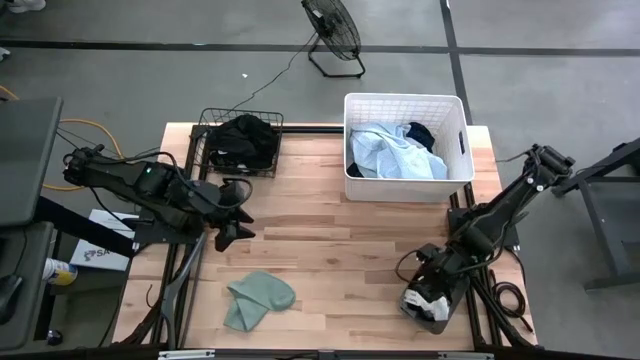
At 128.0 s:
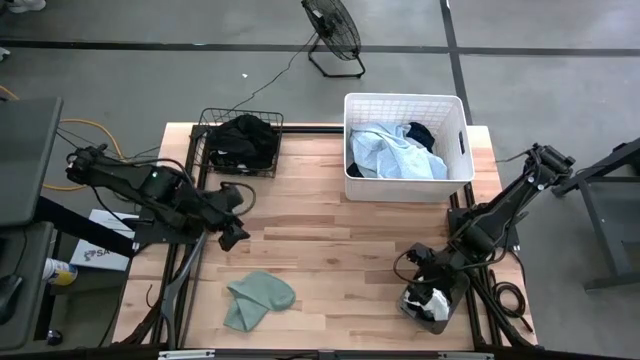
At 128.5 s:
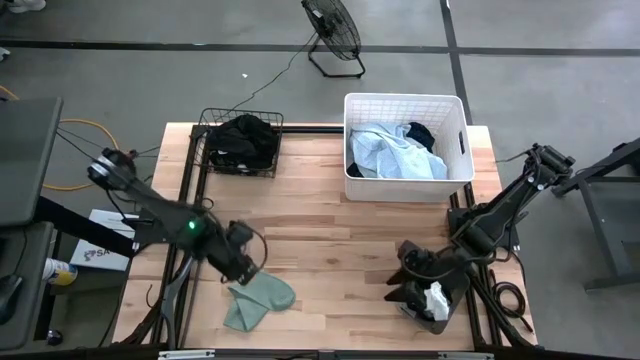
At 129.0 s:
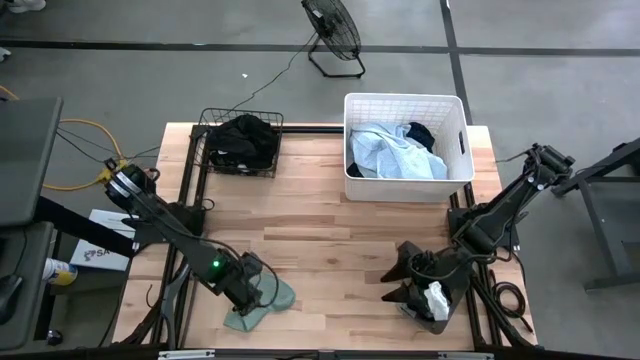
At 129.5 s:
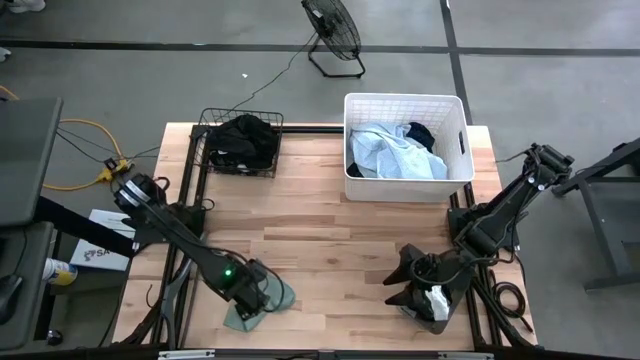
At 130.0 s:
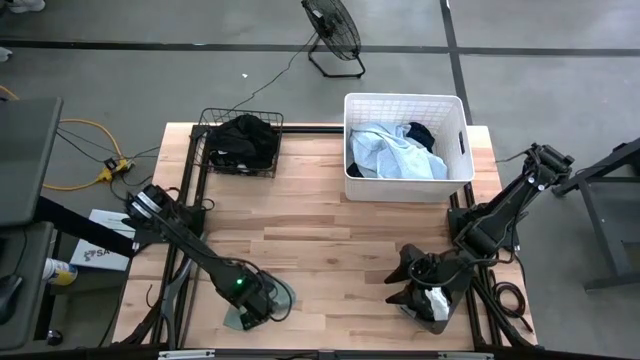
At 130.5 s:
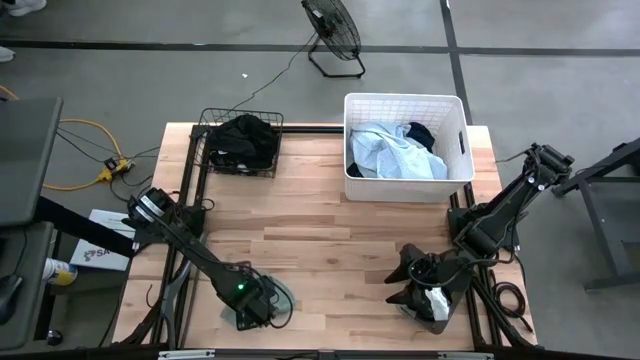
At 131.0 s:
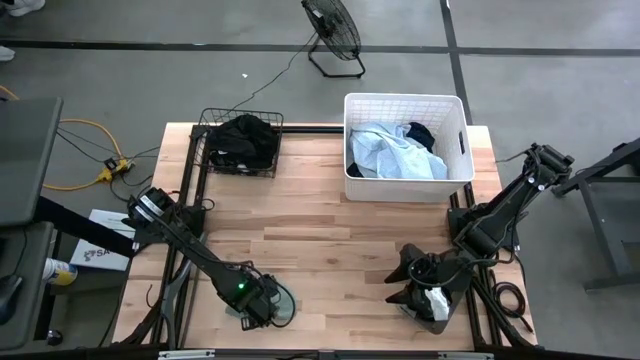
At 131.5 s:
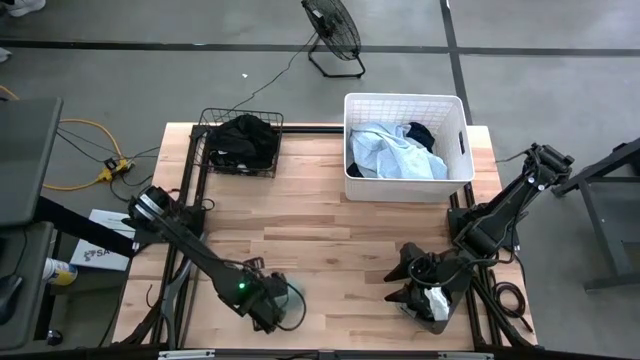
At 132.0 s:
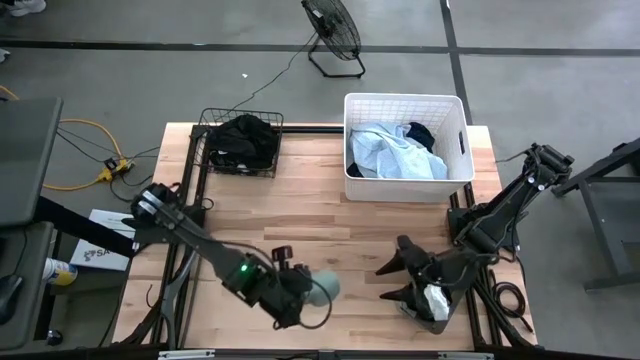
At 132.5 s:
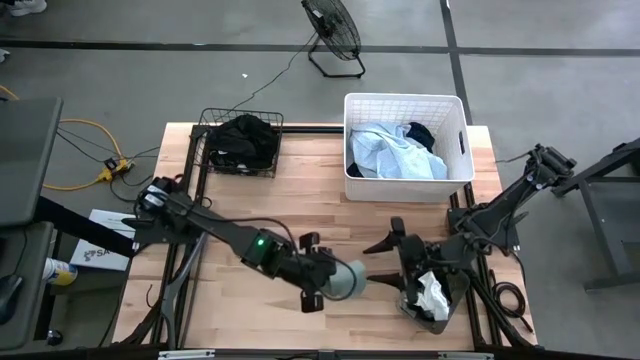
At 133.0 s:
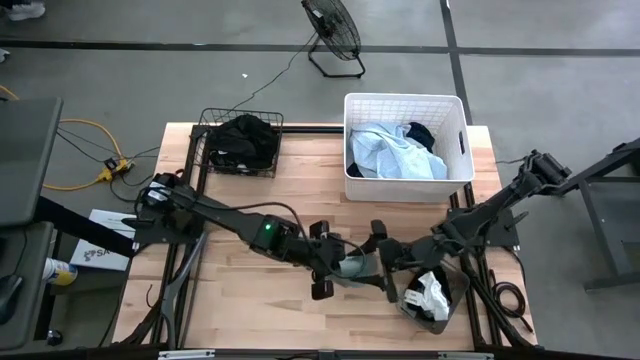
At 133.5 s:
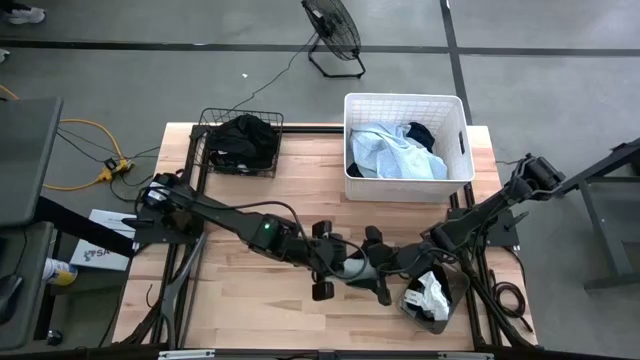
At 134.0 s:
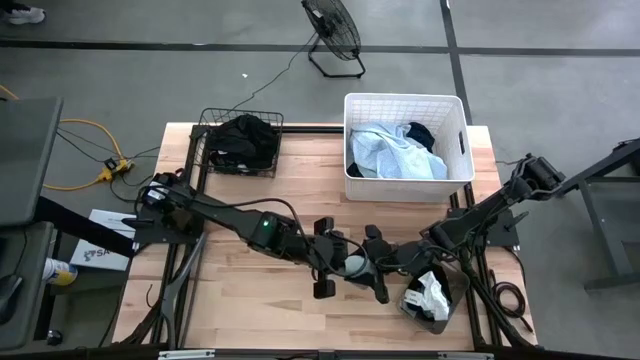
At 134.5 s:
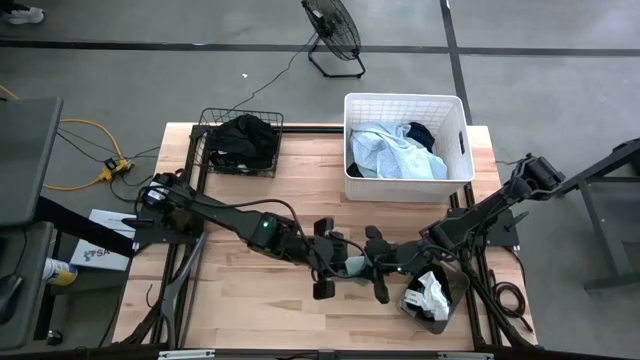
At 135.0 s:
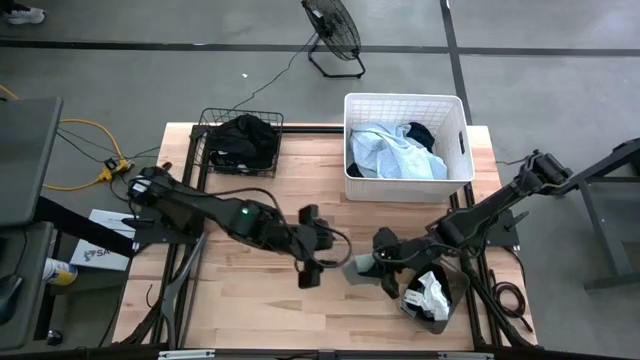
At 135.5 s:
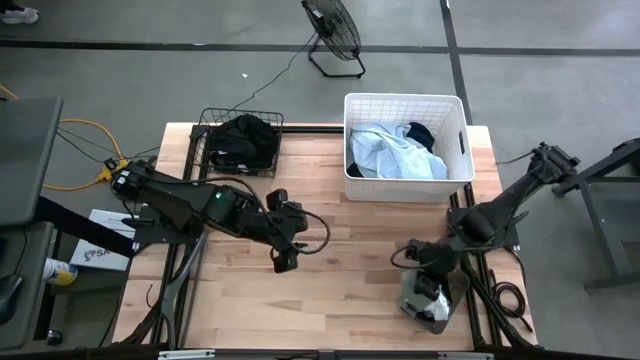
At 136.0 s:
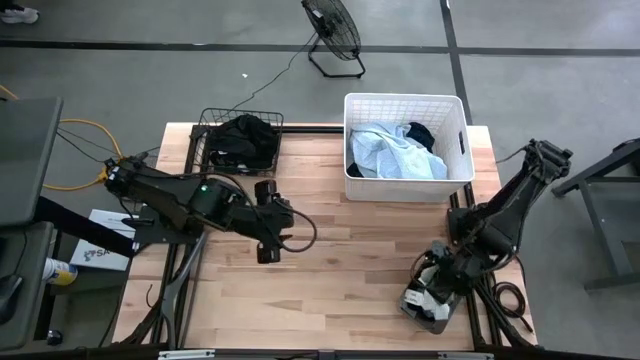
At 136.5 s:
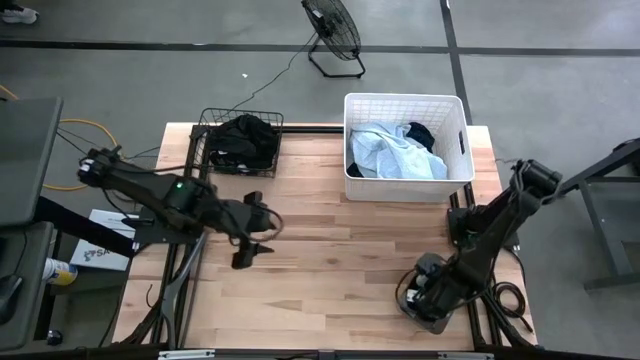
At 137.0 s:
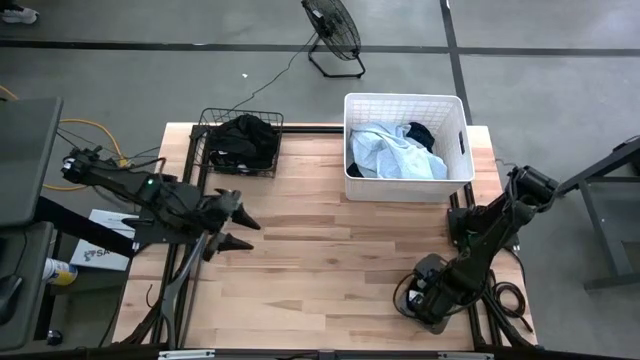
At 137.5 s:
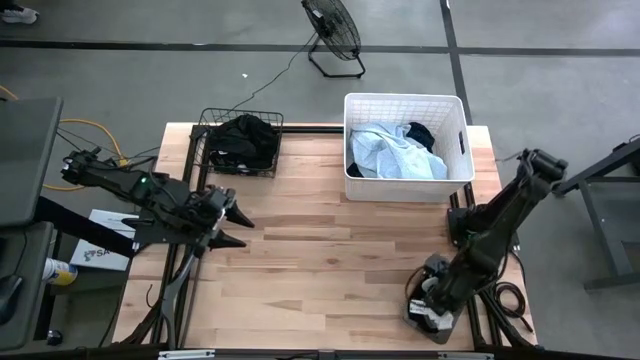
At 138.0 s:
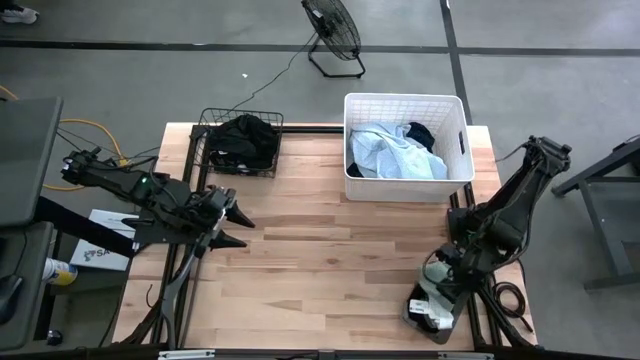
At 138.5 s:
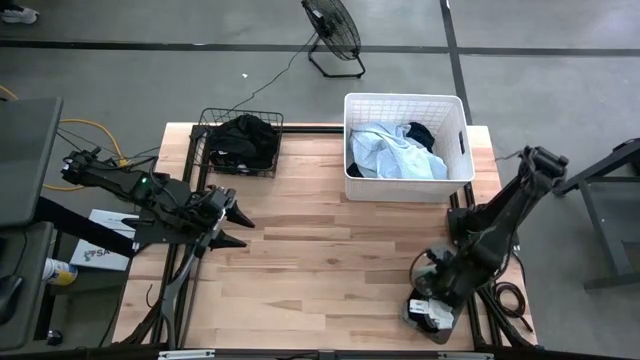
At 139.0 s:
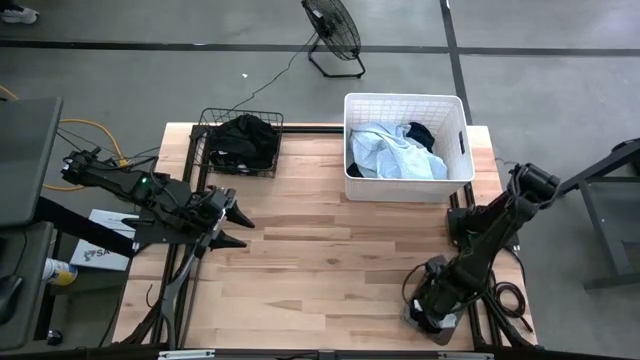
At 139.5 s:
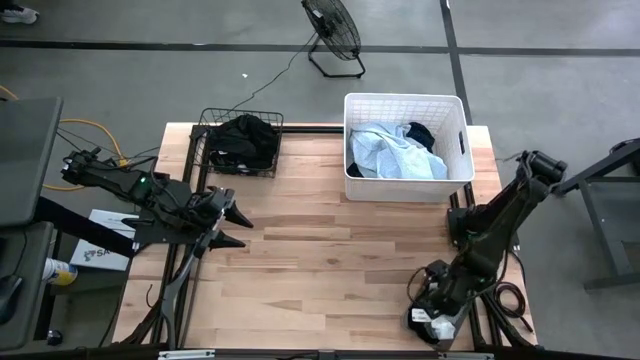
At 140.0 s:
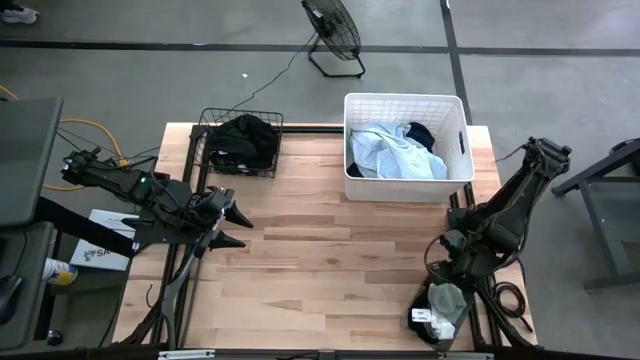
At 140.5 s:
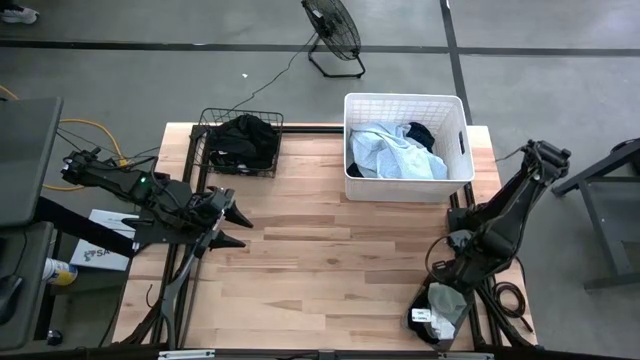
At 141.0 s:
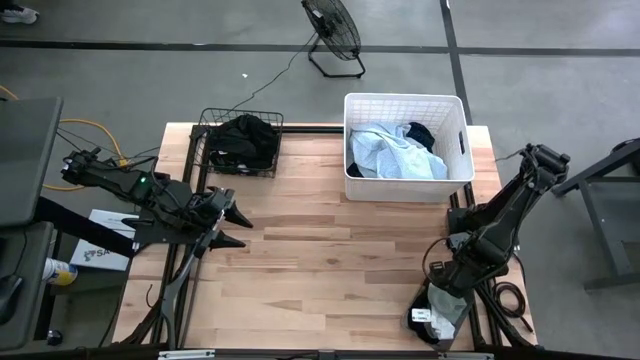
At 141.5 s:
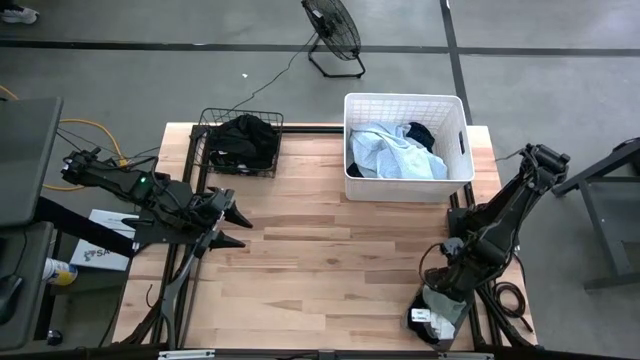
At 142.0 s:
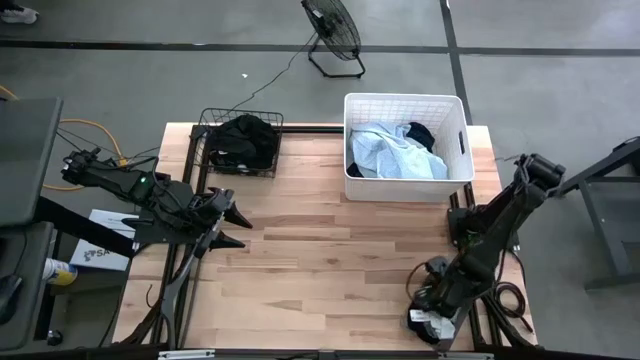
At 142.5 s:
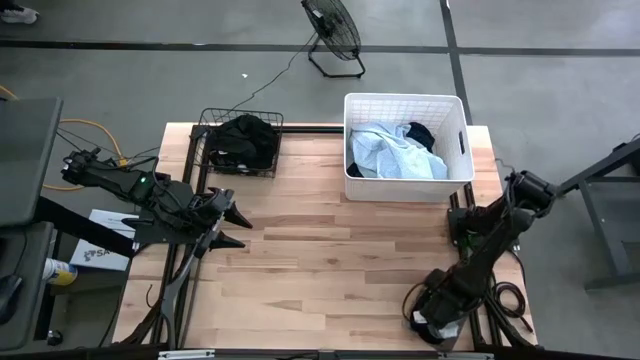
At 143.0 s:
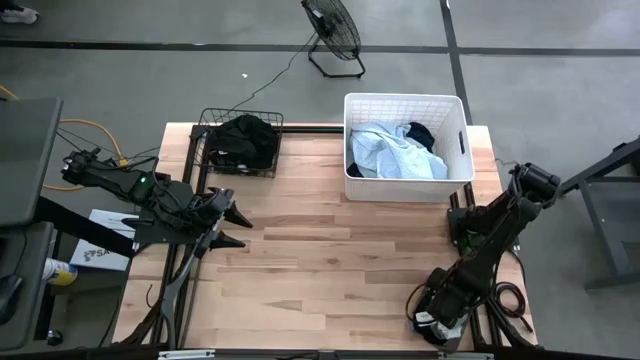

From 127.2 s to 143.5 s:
Task: Pick & Place Cloths
Put the gray sock into the black bin

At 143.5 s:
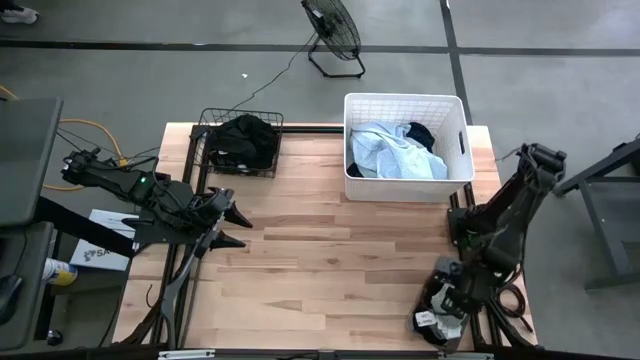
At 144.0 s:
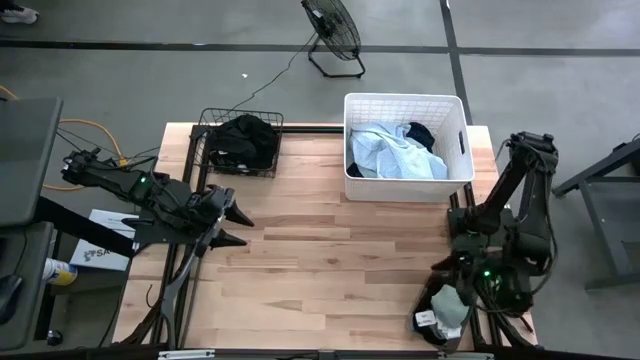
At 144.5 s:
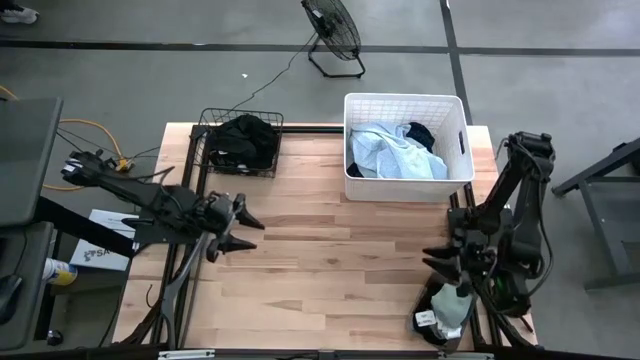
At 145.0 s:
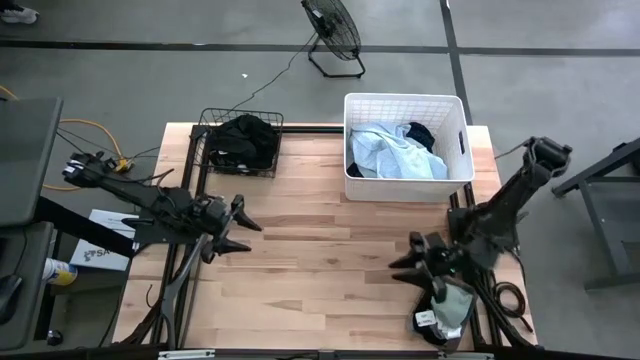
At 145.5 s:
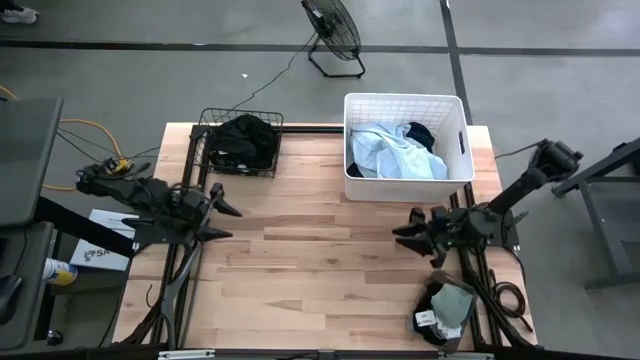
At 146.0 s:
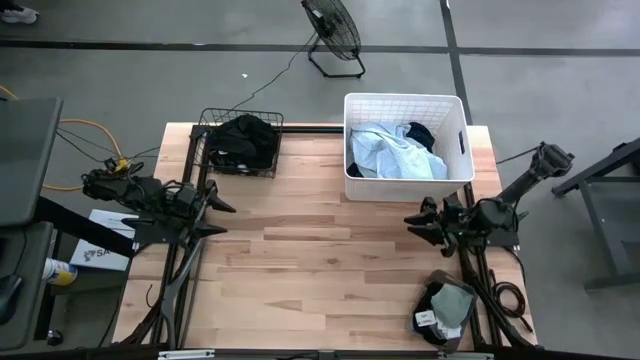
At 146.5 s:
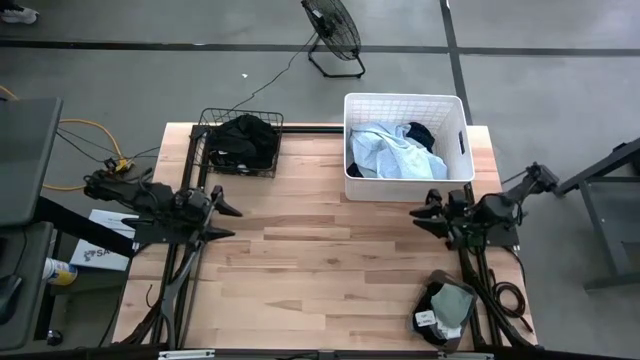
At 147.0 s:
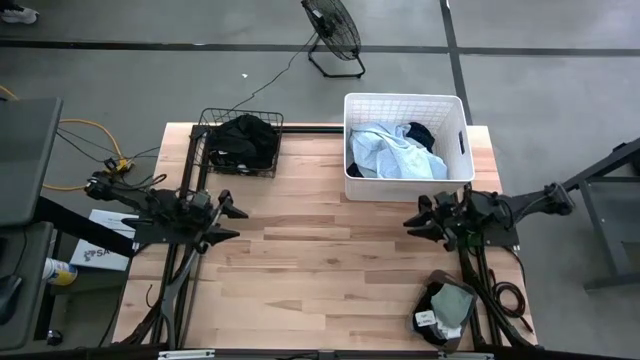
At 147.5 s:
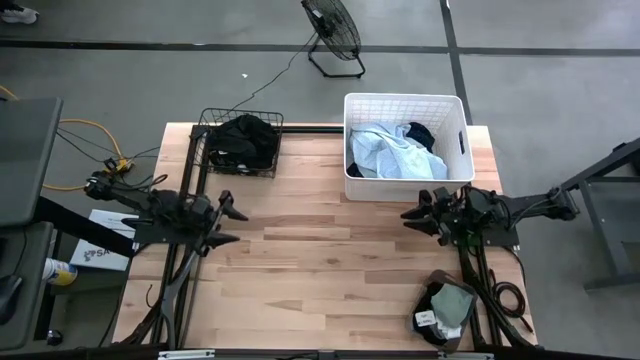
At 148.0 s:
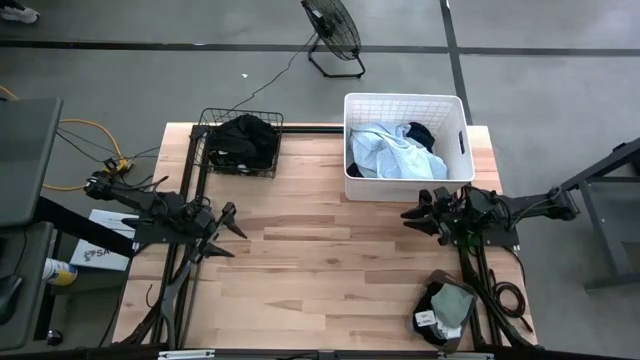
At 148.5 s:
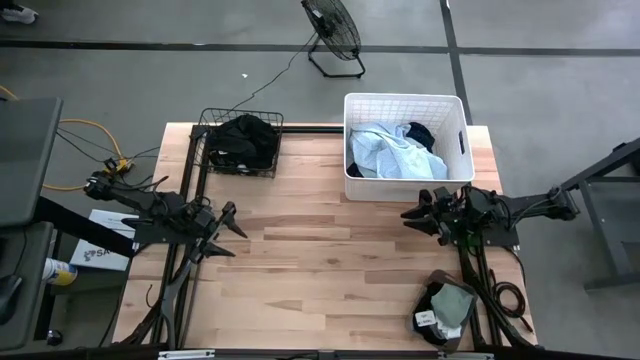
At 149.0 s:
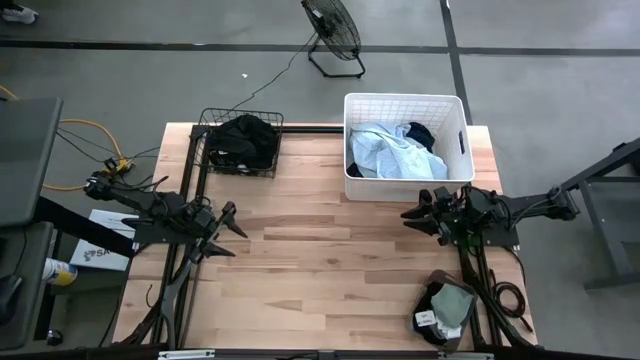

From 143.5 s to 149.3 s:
Return to Home Position
